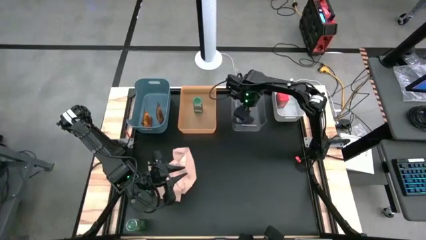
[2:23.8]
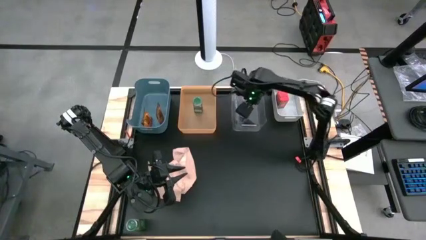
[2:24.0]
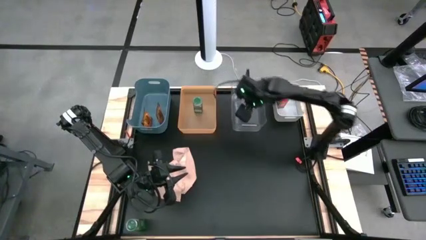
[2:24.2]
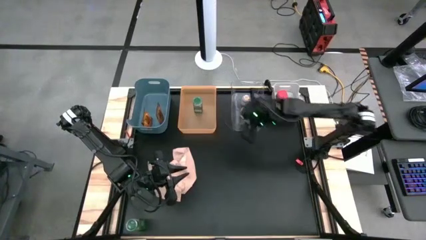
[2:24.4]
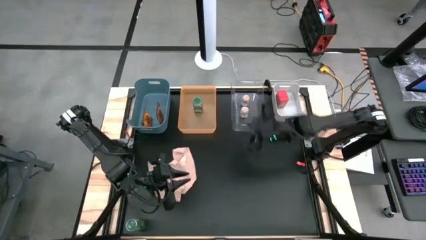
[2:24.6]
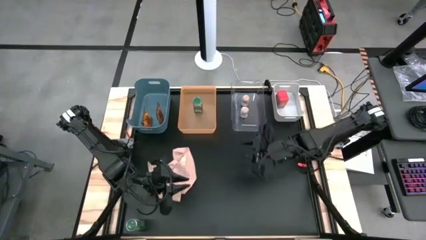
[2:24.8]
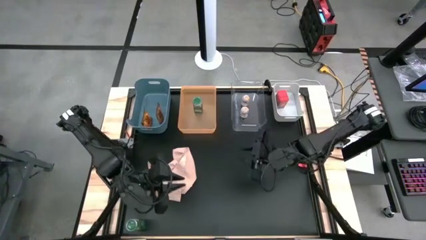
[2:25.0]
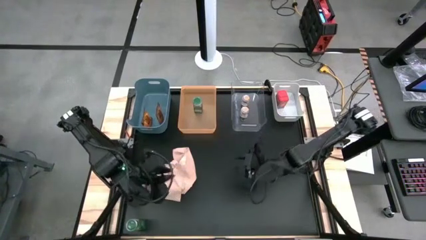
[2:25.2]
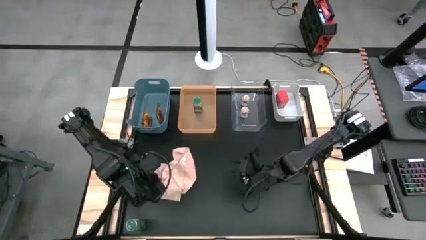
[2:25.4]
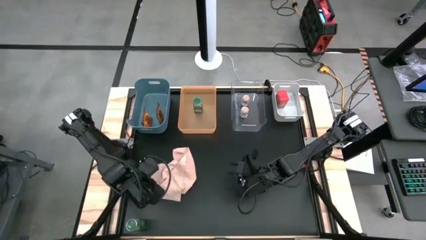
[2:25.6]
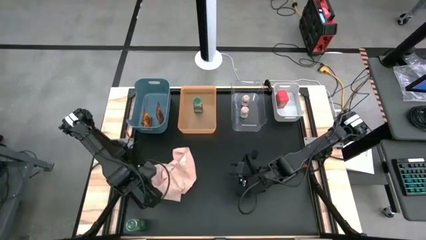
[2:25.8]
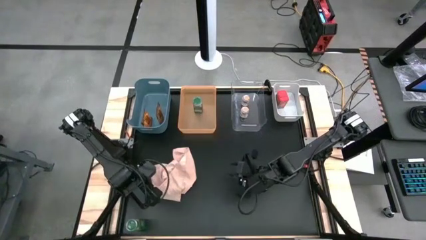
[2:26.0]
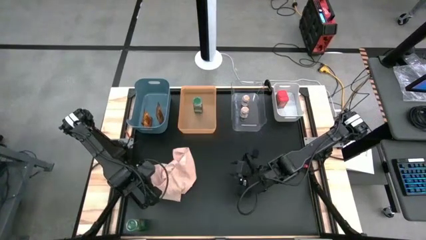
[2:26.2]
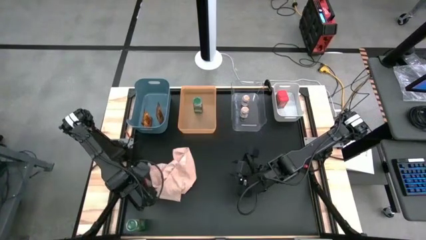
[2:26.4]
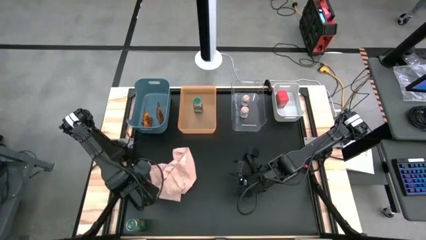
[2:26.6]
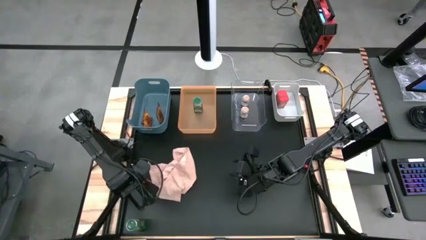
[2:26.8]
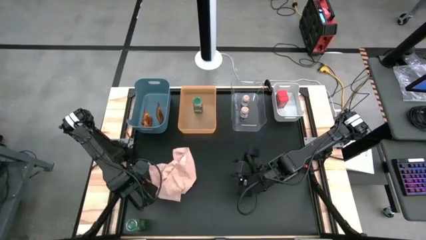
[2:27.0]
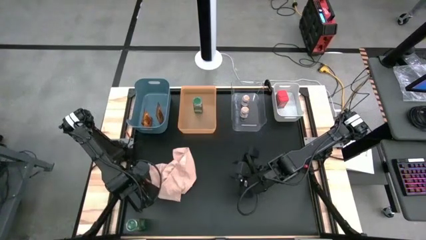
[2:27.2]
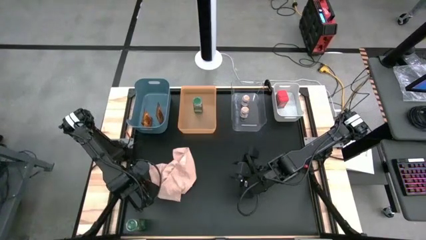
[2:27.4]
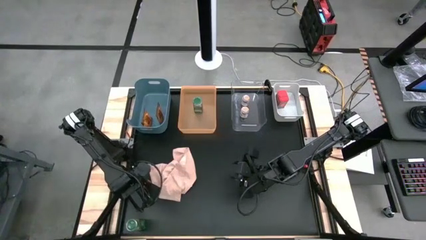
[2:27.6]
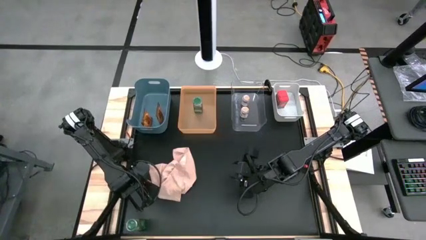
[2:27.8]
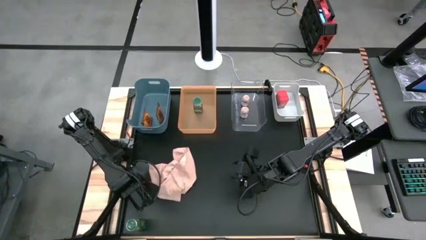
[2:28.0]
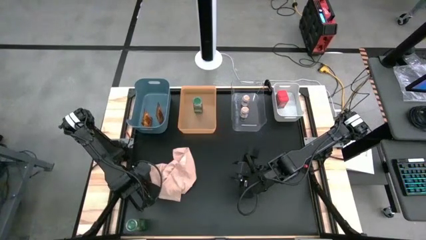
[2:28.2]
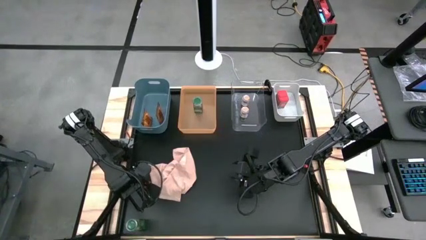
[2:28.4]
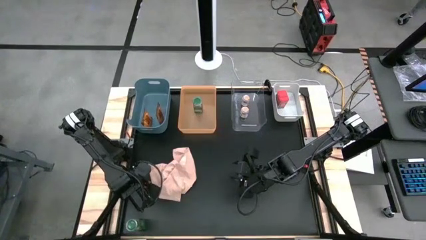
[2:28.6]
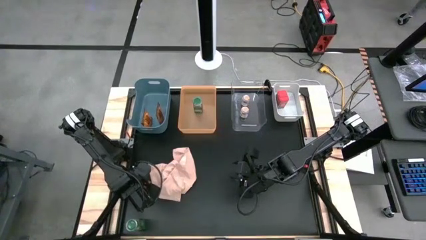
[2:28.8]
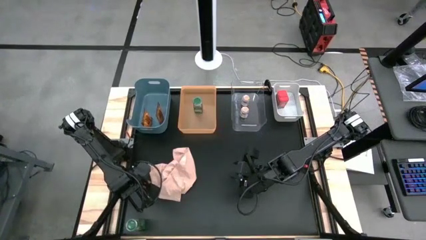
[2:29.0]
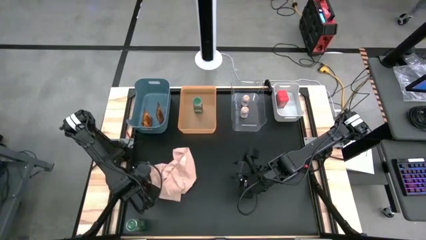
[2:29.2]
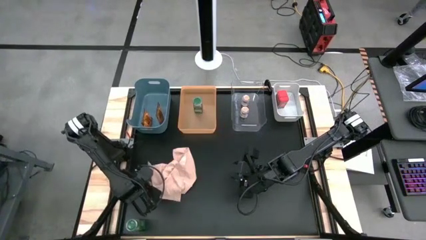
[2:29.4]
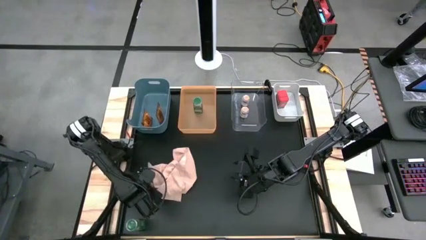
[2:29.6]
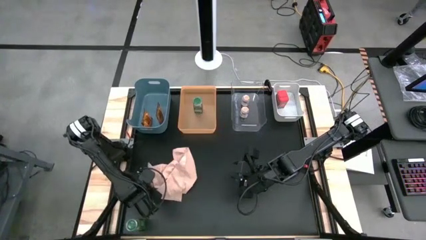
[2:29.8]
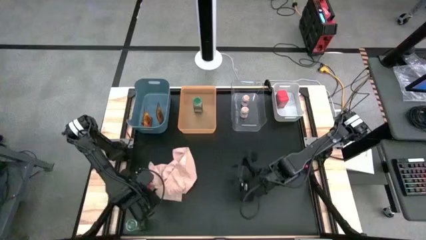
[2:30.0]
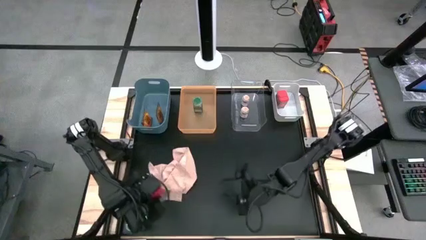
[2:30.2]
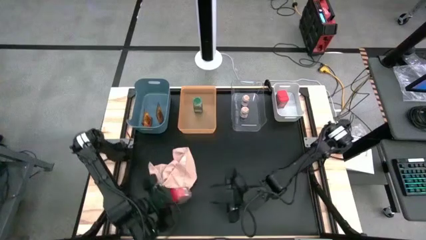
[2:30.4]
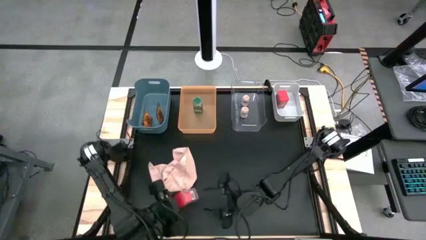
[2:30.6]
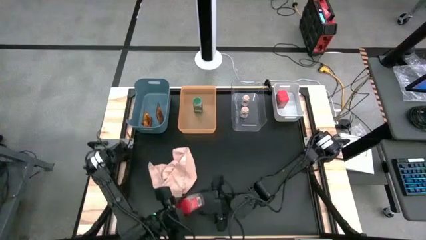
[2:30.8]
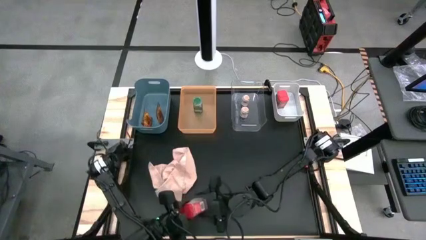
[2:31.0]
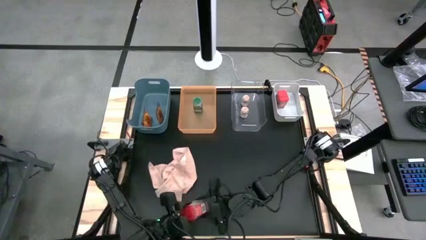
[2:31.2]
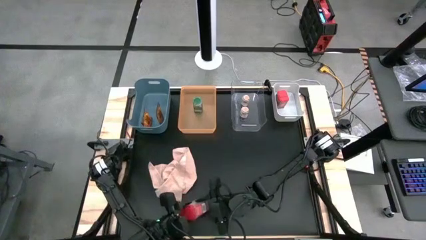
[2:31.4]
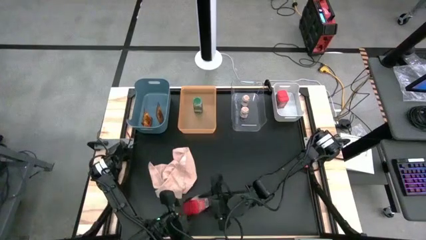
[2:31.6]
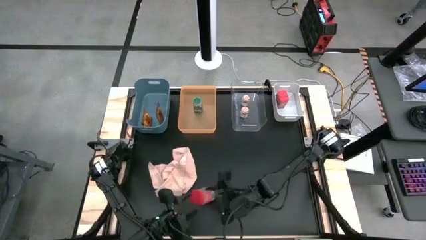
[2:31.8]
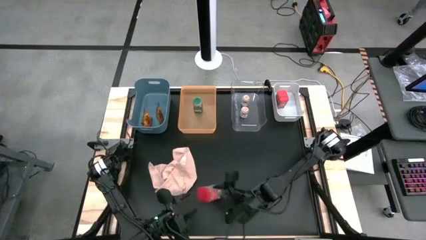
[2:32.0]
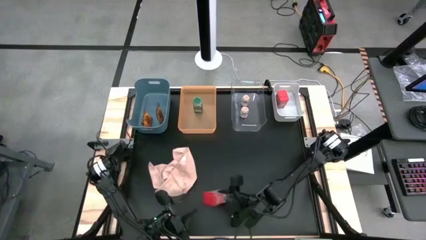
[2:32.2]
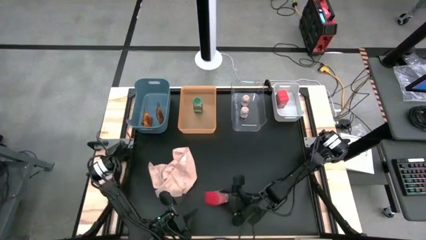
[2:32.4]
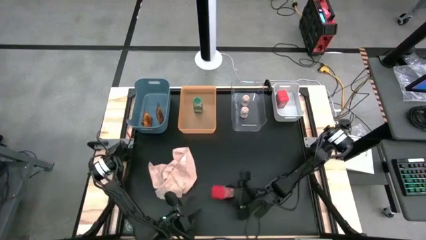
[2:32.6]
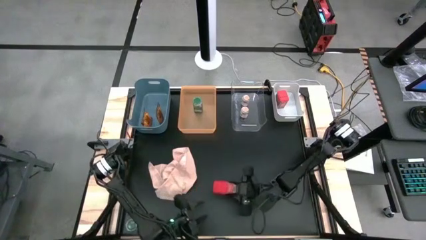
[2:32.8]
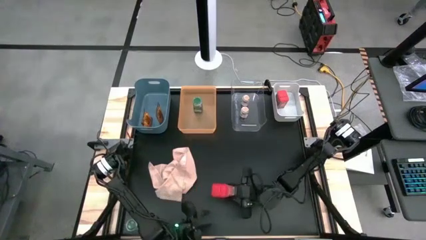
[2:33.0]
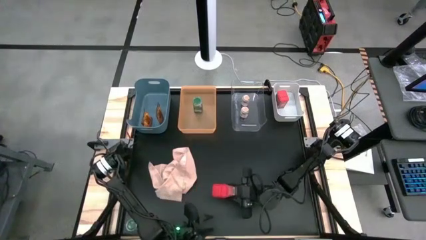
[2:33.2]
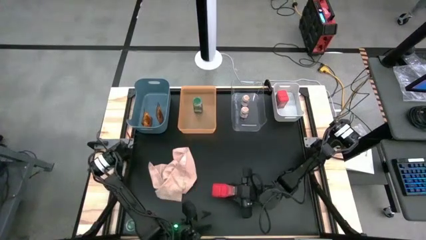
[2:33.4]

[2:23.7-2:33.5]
Task: Sort spices by type
Put the red seasoning can into the white bin

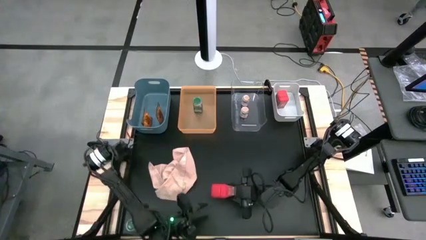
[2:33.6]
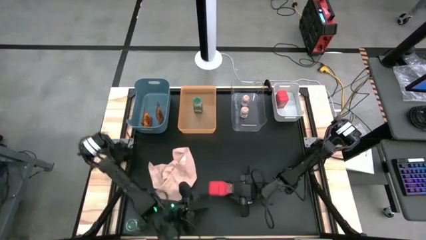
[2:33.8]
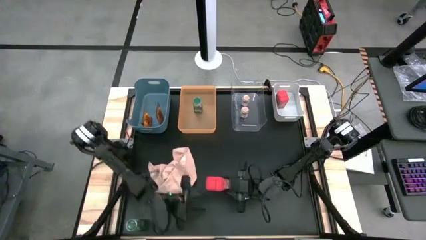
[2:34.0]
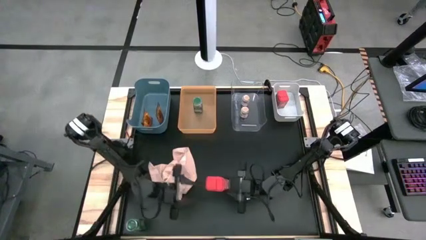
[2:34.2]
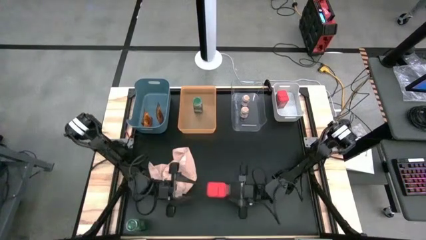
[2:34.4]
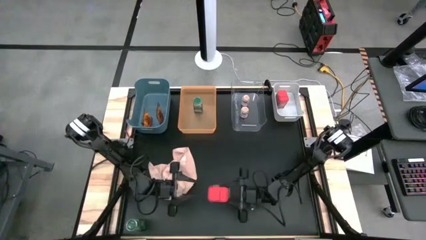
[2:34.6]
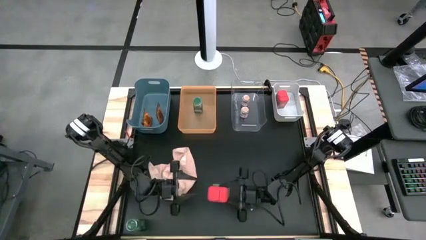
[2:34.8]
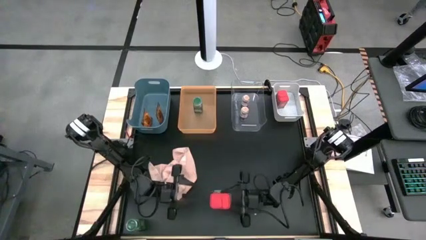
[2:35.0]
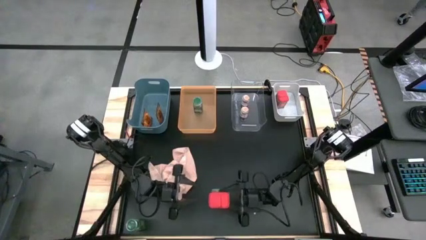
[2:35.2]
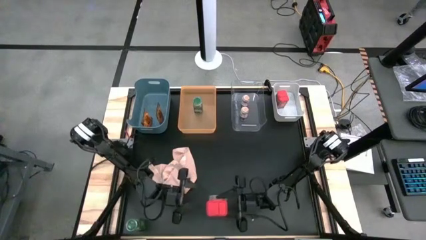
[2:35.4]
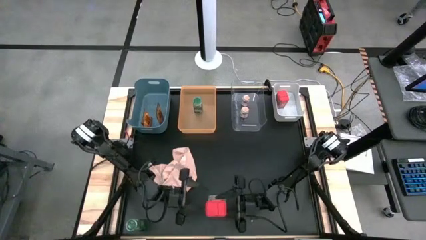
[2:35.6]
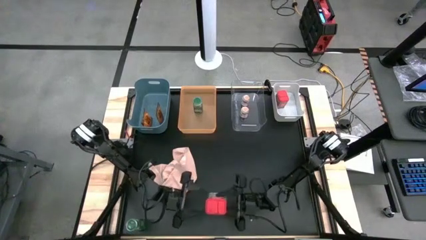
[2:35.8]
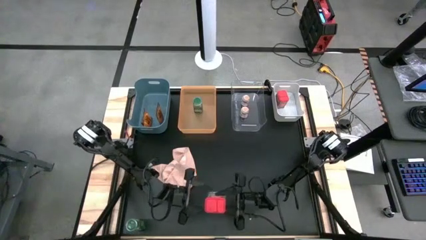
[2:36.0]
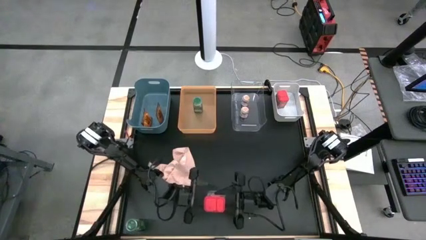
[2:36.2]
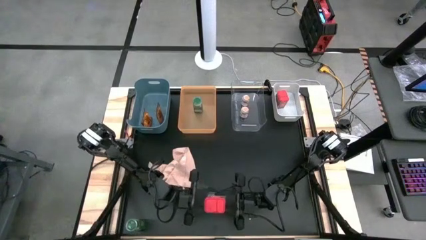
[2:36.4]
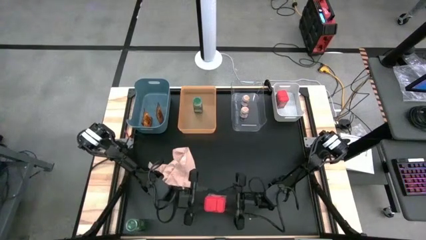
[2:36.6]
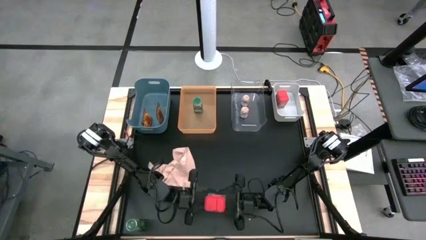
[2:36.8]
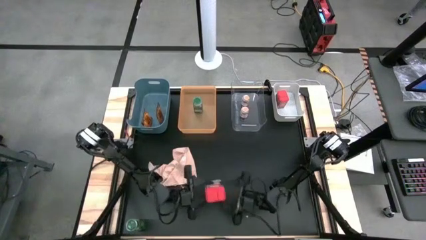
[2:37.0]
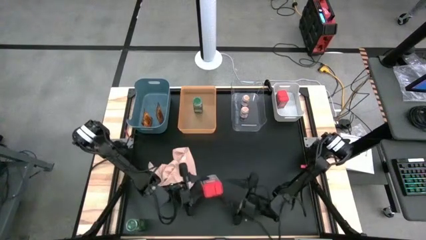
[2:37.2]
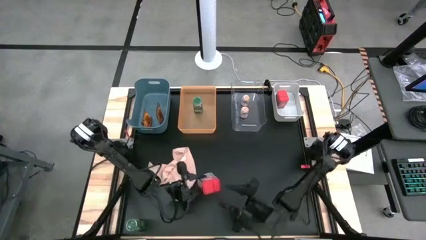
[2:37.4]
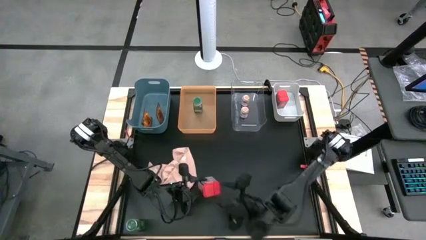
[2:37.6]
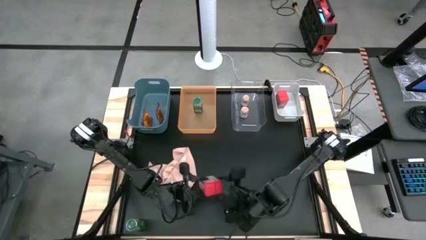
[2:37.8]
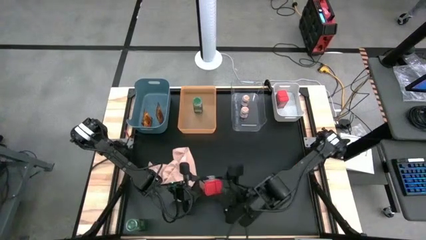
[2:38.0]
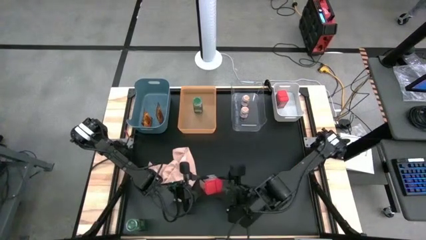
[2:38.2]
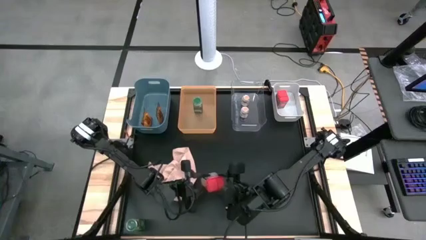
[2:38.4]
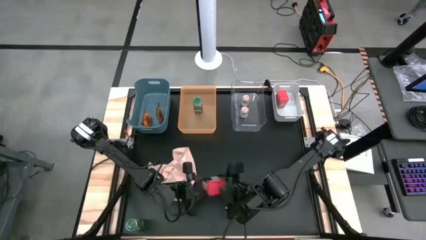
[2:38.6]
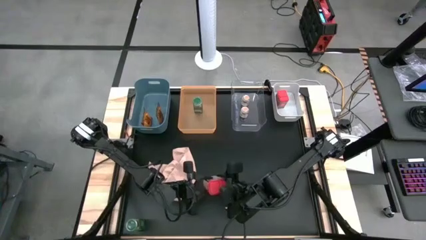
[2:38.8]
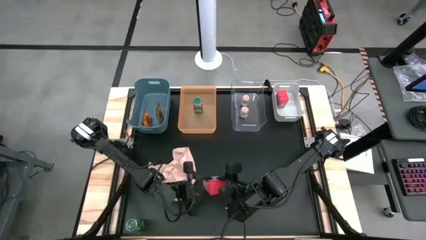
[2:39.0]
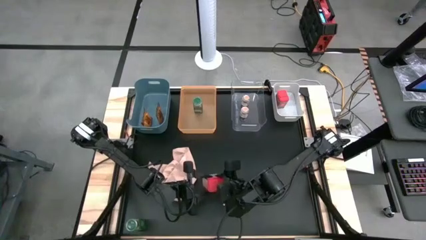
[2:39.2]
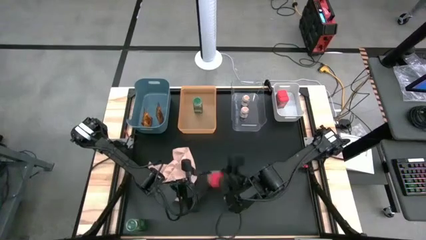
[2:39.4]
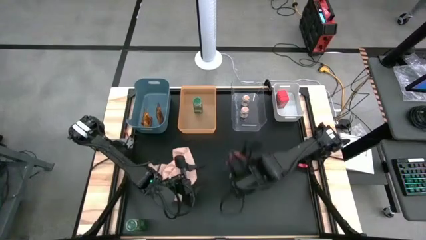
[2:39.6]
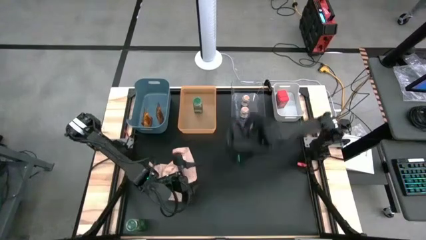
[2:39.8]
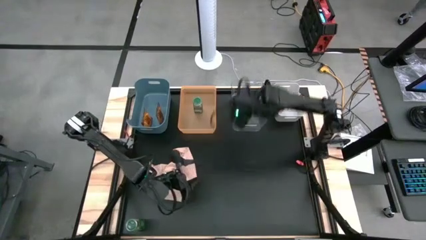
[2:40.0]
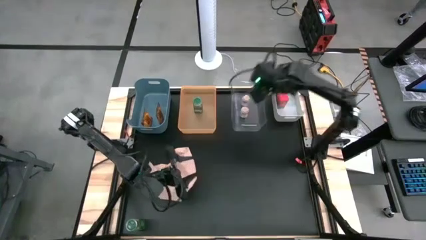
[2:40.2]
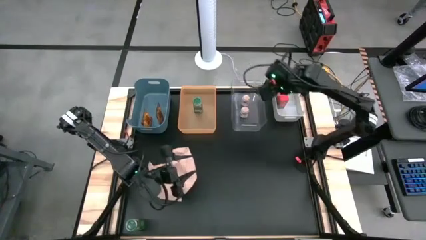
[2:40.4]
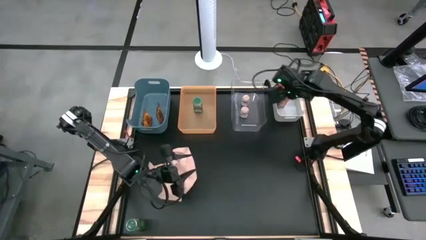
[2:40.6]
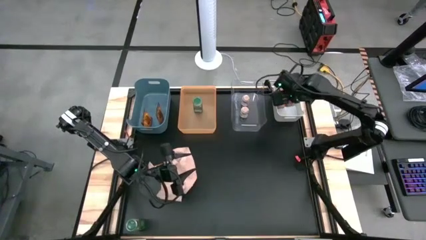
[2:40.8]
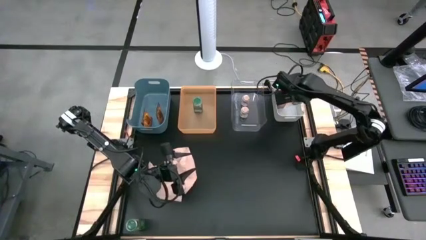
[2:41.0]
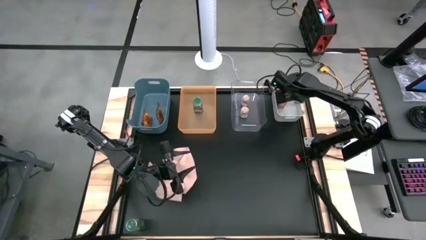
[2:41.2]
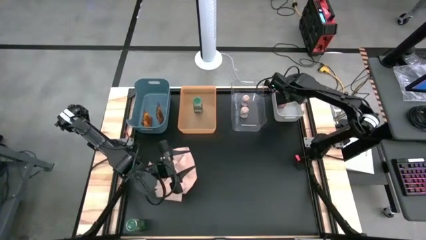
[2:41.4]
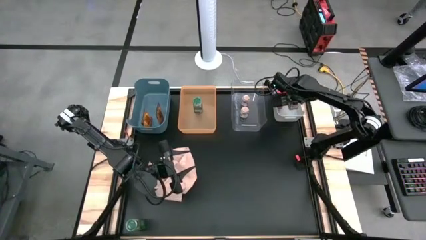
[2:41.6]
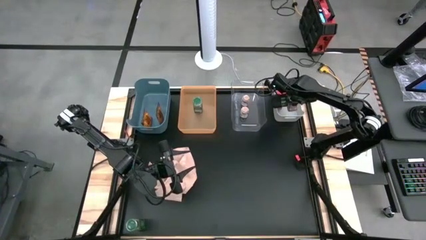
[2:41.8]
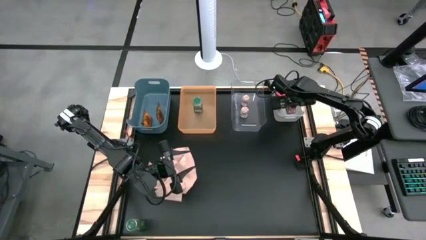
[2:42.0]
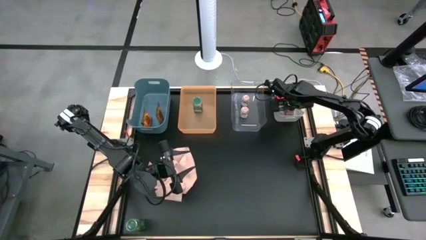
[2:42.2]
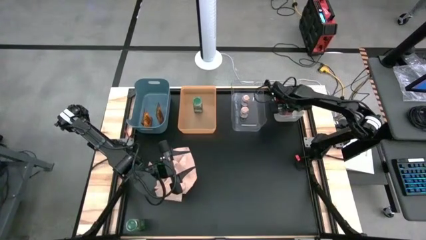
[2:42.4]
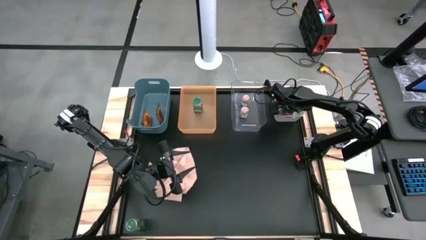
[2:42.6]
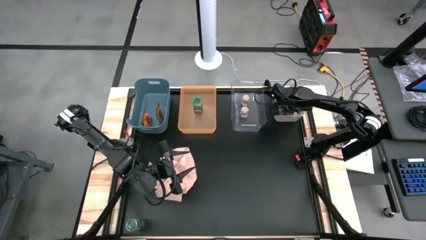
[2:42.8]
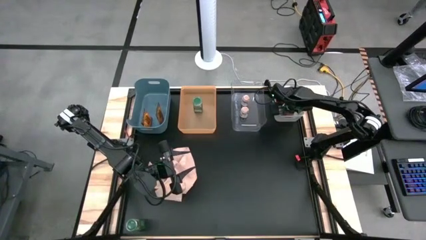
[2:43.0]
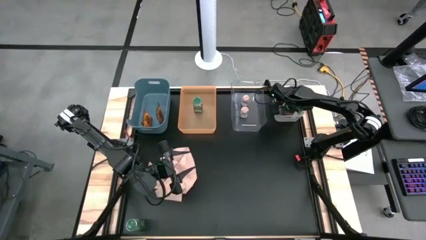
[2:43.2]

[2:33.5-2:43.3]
Put the red seasoning can into the white bin
